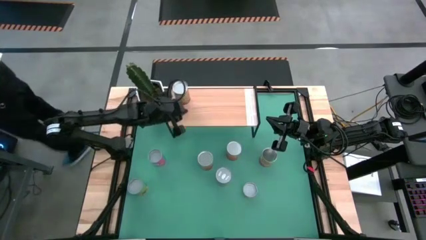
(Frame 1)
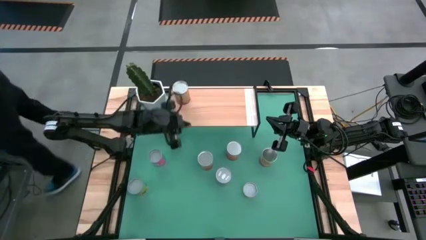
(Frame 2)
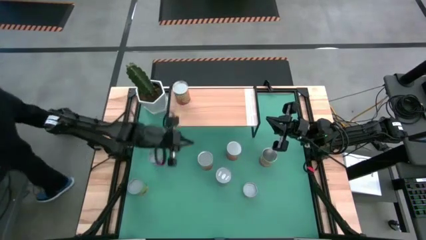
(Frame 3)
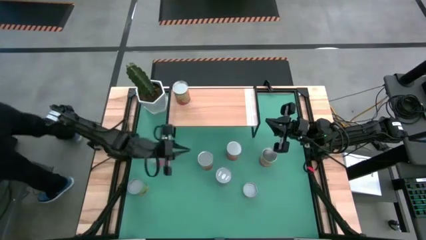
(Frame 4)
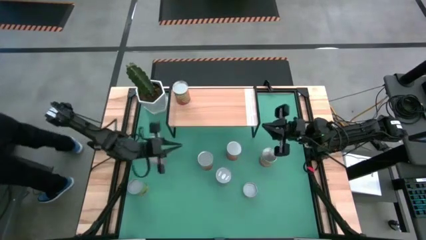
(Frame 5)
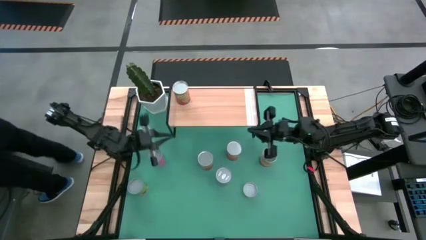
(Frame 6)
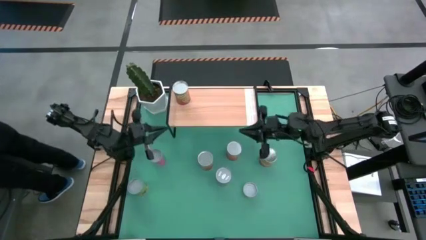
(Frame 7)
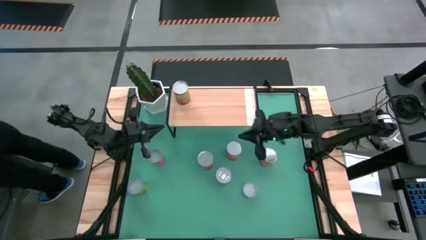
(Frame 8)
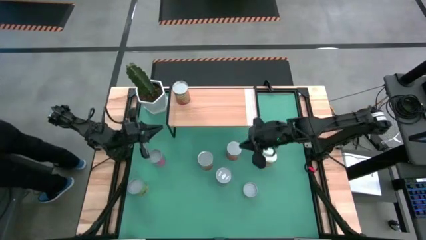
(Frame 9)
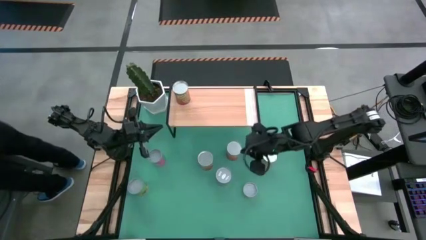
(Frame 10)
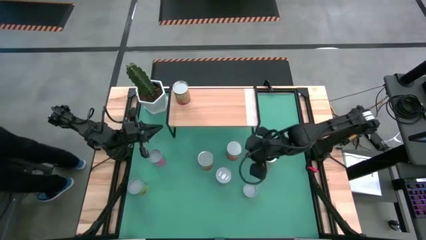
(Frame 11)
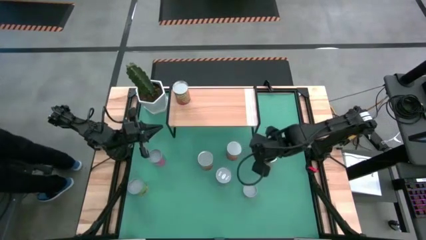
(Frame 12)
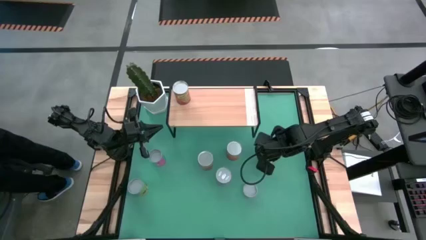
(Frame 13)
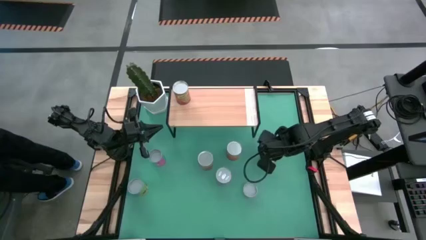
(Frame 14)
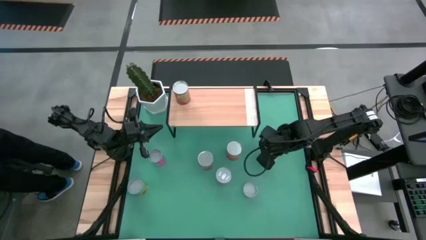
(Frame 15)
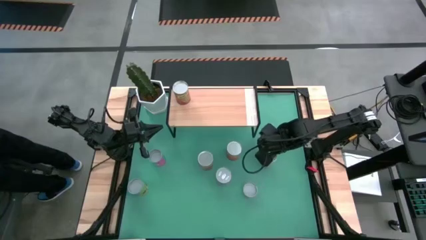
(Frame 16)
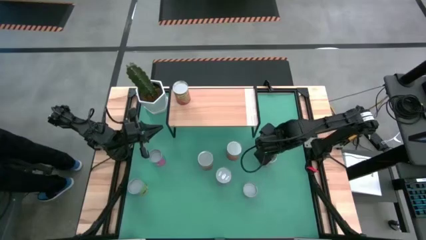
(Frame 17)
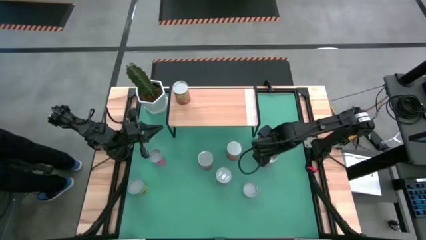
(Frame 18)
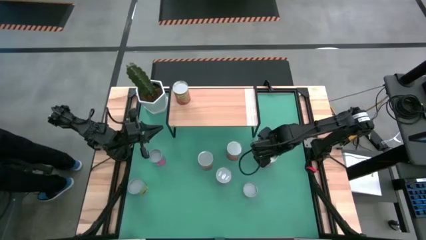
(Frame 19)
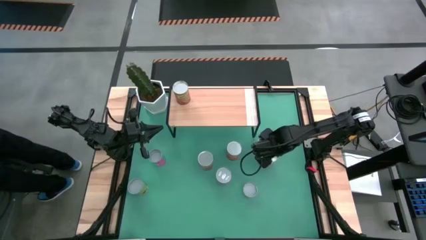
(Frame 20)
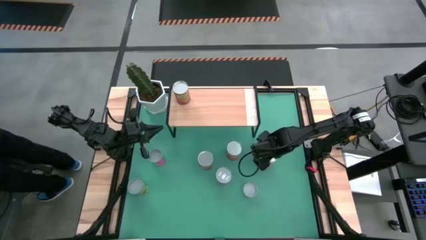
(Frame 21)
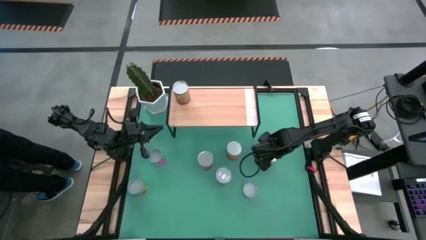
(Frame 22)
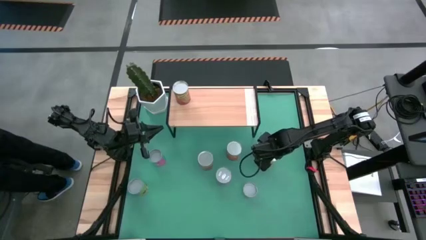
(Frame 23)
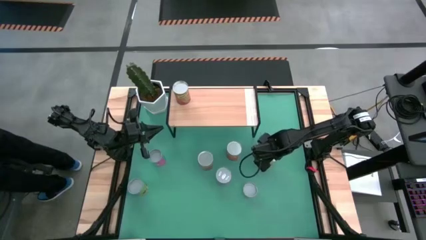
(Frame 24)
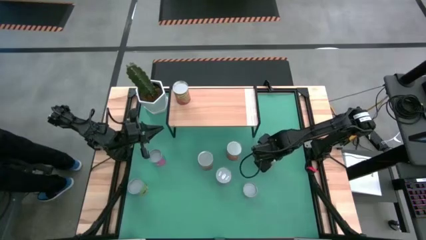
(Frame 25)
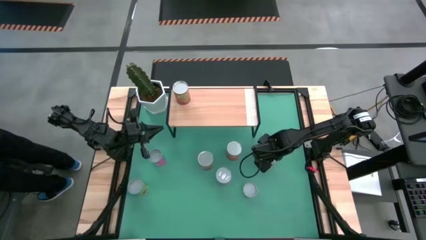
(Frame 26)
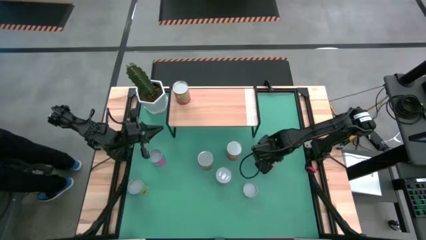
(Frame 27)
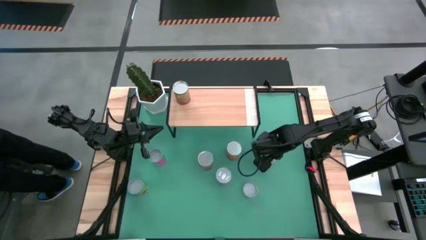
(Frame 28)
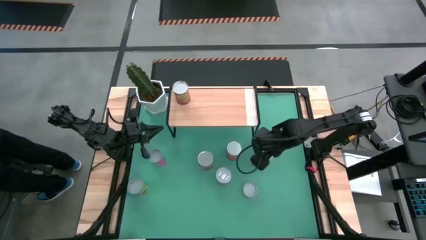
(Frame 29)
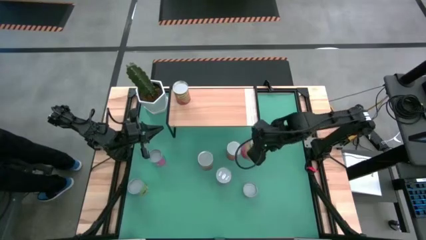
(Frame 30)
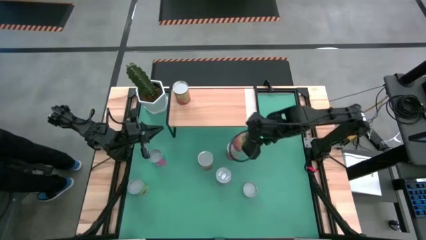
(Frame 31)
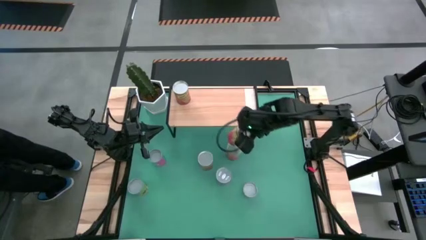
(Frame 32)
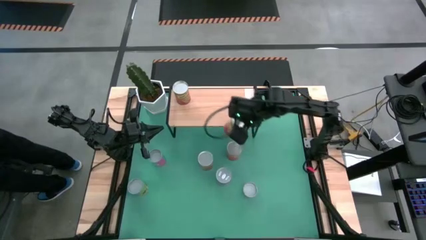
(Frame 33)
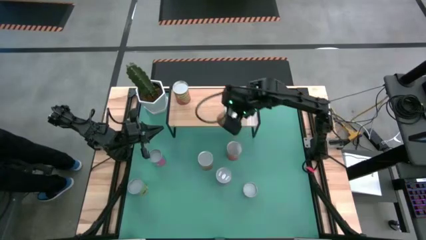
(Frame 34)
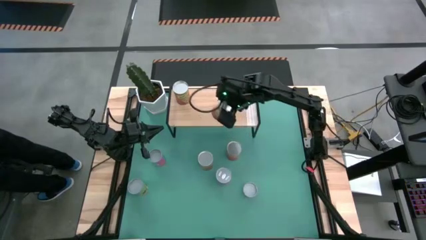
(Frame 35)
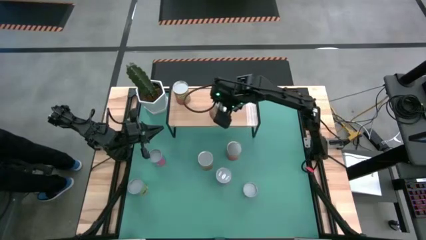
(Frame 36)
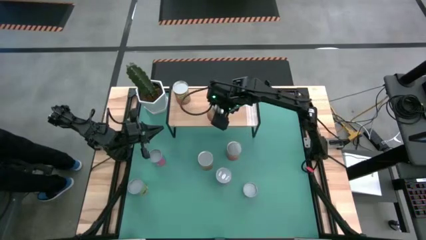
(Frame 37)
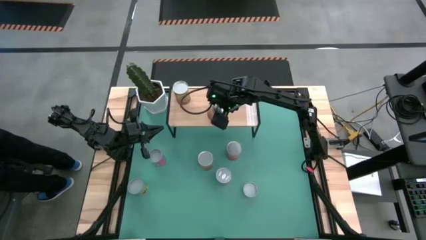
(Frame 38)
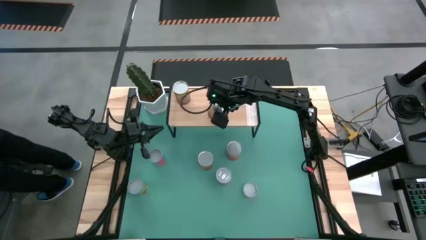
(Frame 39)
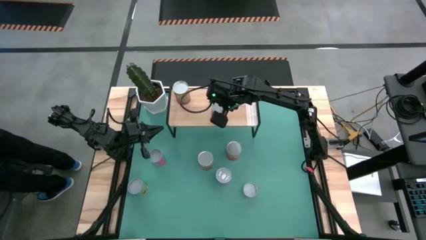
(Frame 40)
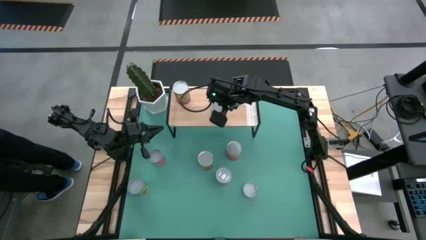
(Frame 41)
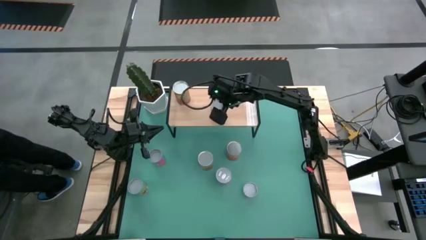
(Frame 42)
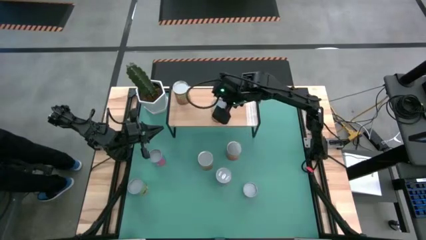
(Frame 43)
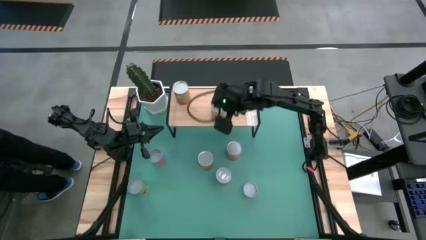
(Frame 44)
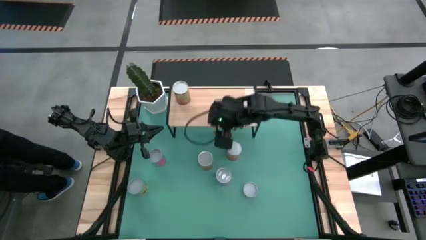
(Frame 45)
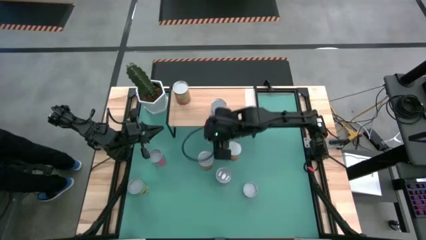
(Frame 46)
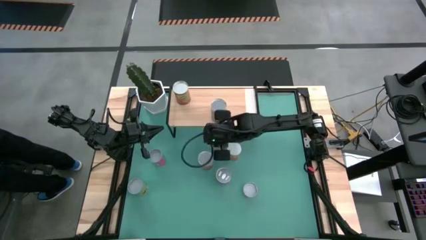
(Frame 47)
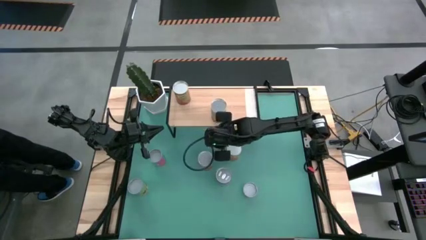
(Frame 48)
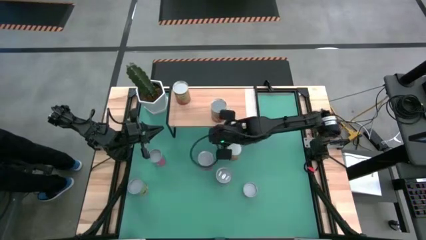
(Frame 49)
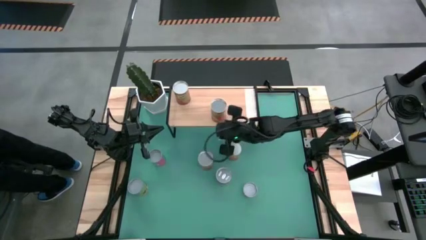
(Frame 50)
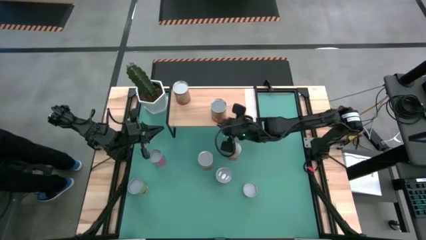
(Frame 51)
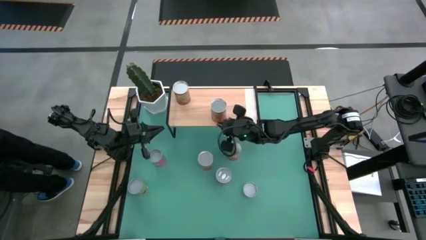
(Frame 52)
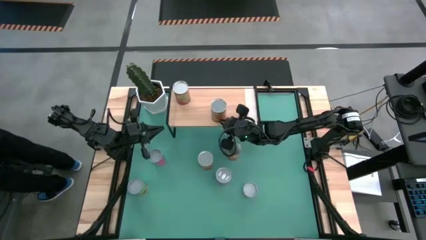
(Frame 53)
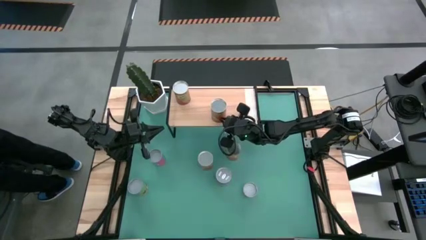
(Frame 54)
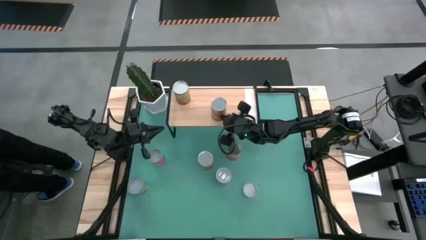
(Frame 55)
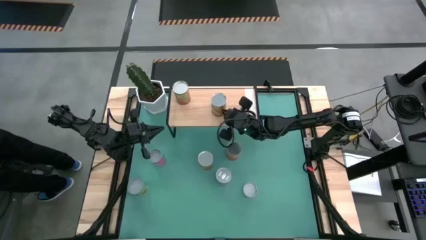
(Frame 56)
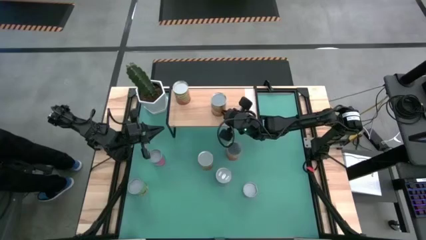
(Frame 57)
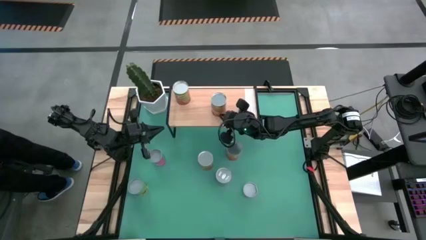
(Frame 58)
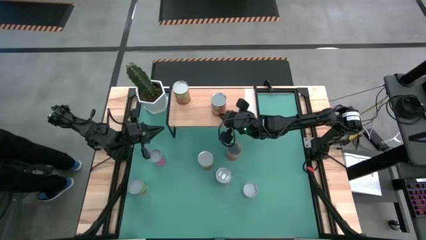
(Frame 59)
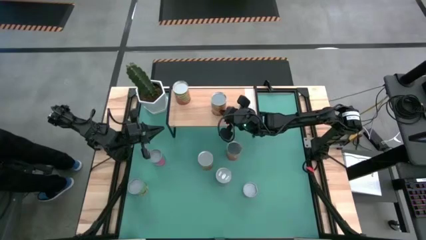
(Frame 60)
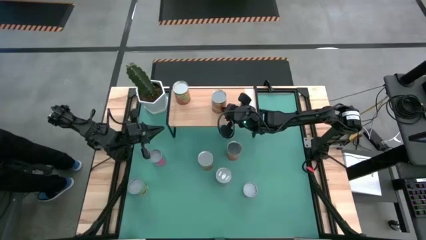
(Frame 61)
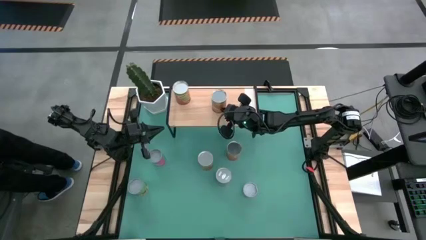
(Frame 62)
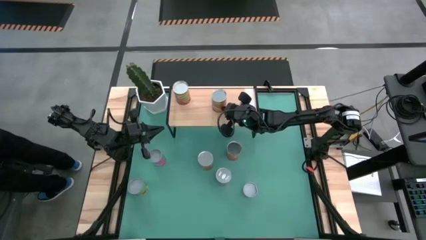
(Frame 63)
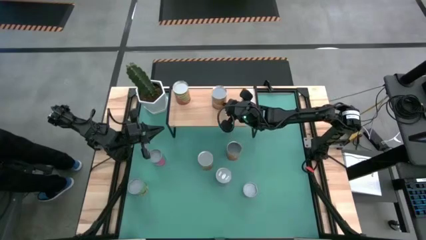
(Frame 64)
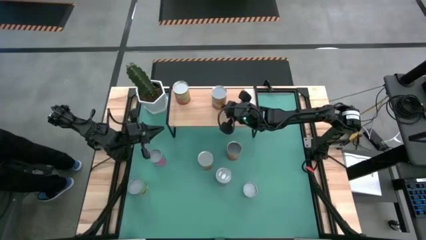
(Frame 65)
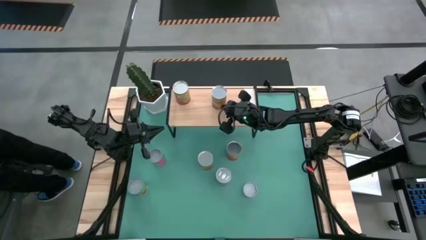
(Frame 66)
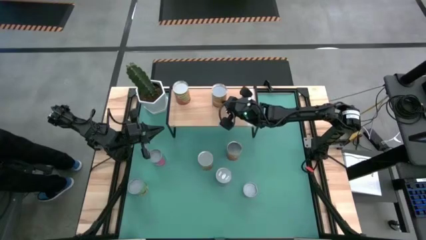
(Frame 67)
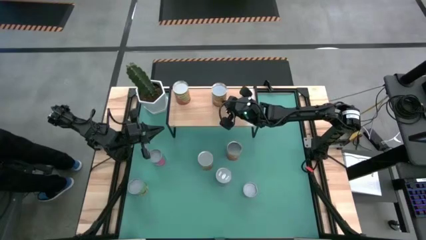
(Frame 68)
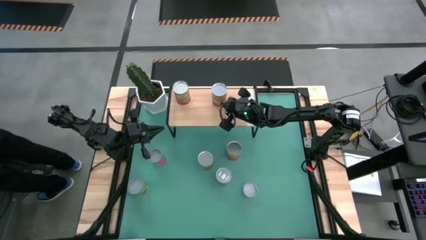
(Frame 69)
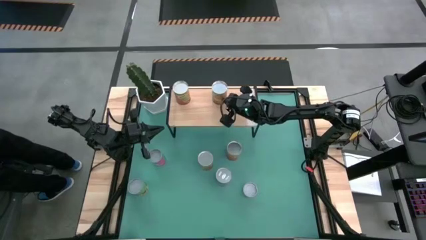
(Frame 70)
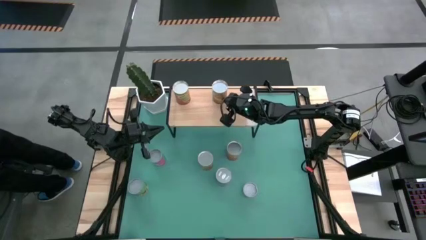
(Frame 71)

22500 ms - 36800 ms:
Task: Pick and place cans onto a shelf
Put the right canned corn on the shelf

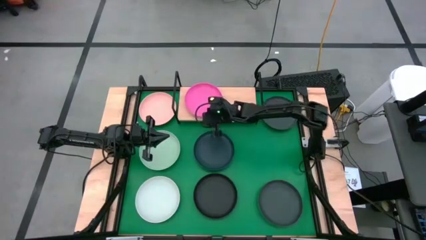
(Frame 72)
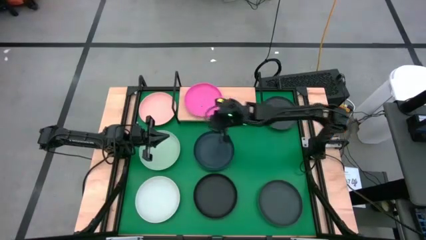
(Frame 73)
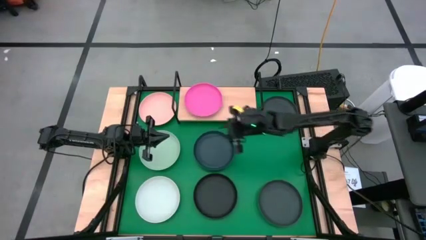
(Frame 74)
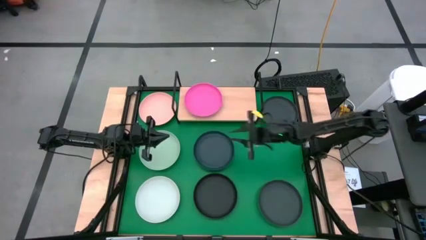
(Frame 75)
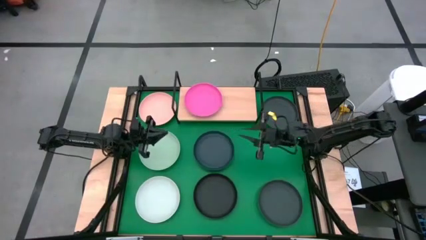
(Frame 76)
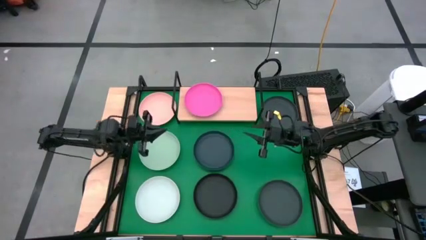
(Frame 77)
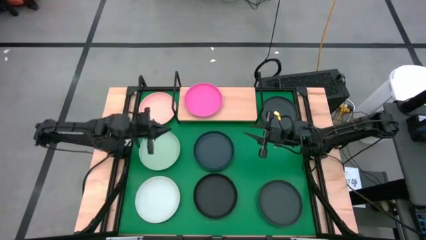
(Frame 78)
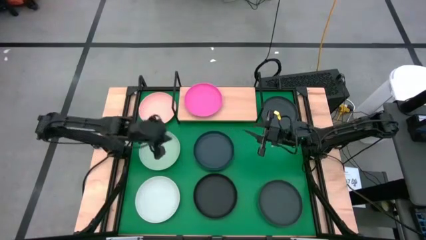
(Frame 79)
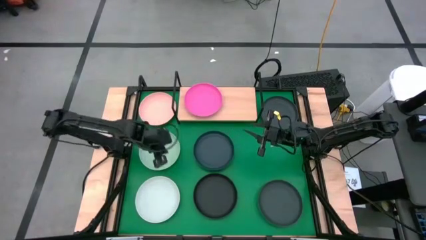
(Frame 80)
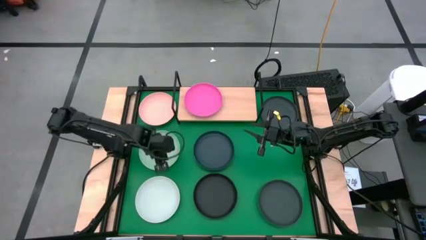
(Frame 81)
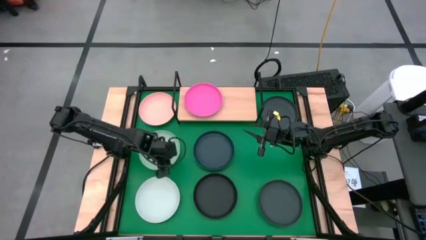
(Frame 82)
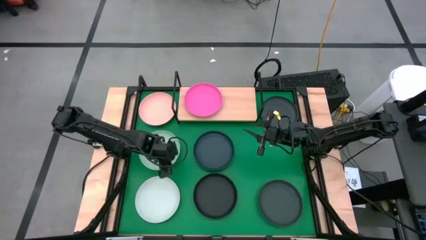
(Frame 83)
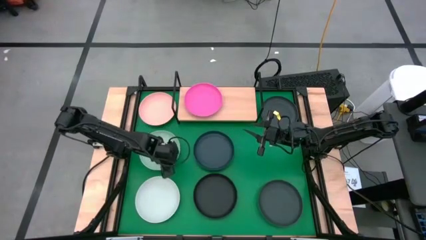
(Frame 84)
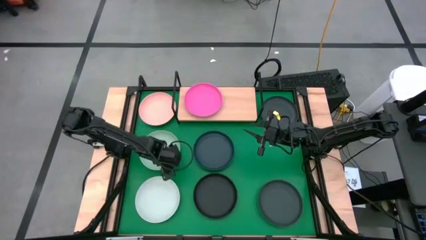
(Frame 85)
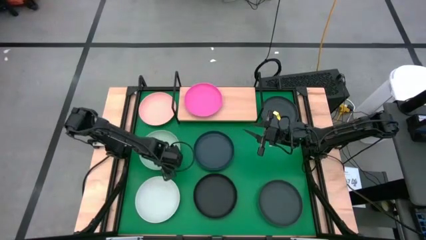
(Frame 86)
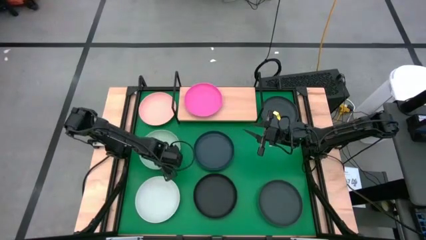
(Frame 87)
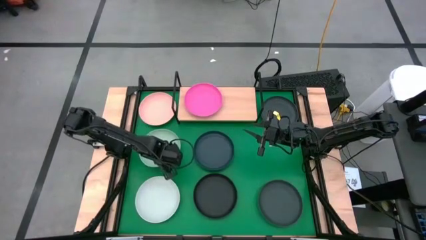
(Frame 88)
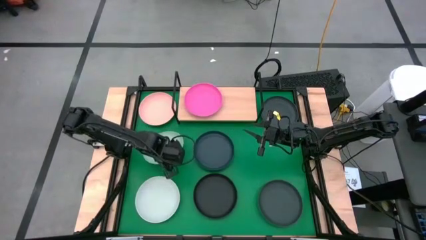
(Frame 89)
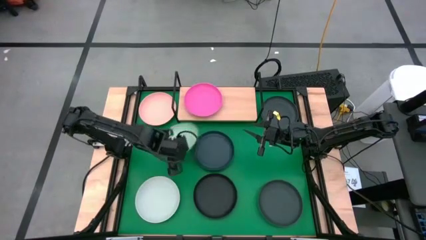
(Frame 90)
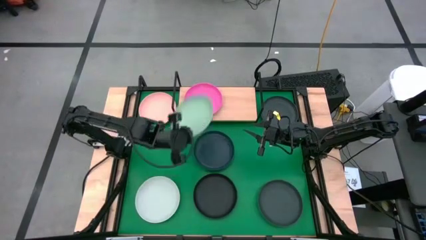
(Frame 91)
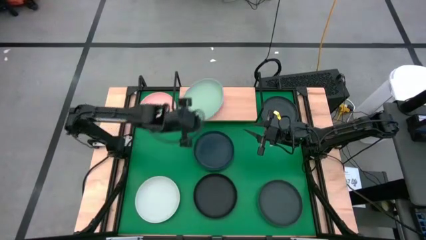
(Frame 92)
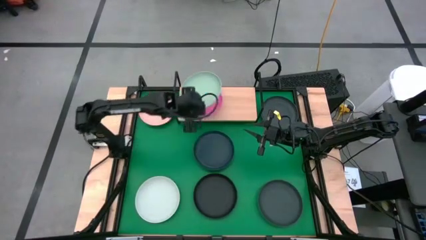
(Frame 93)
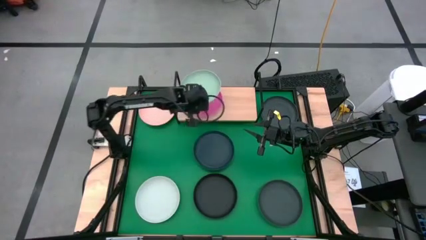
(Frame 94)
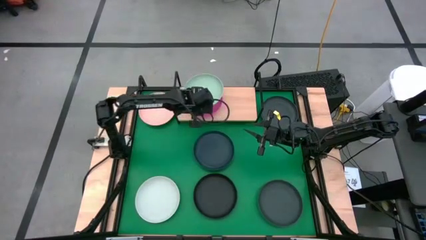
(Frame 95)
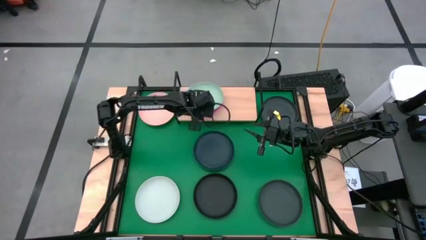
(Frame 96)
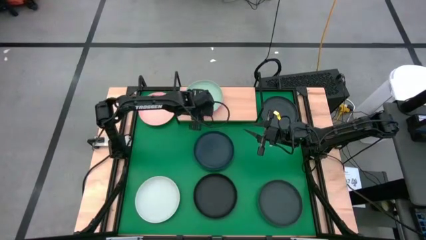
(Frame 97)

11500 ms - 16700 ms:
Task: Place and stack plates onto a shelf
Stack the green plate on top of the pink plate on the shelf
